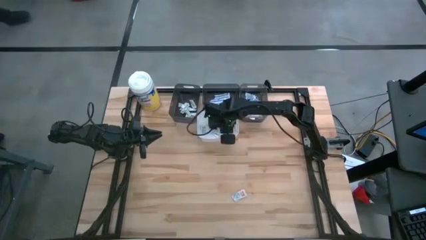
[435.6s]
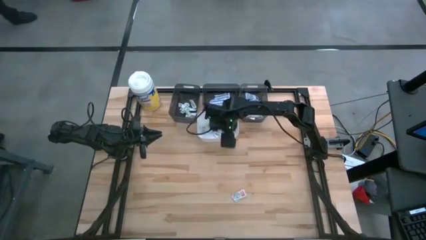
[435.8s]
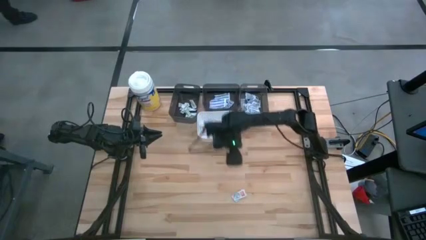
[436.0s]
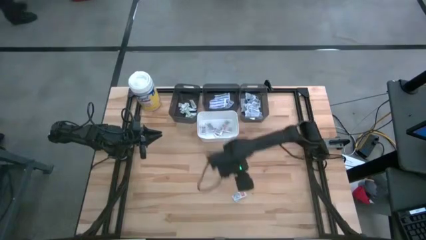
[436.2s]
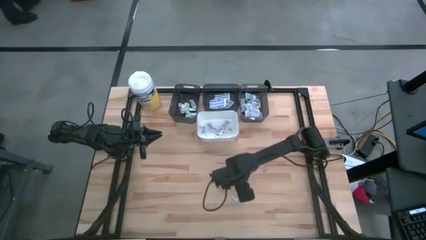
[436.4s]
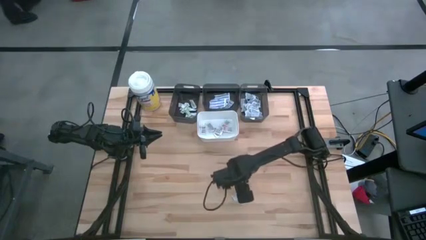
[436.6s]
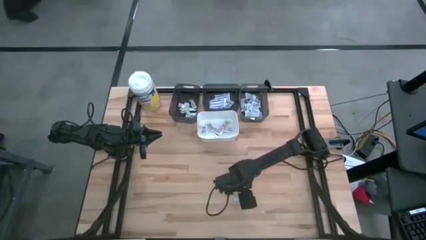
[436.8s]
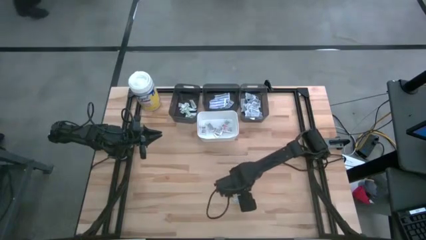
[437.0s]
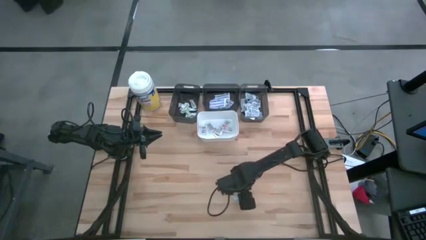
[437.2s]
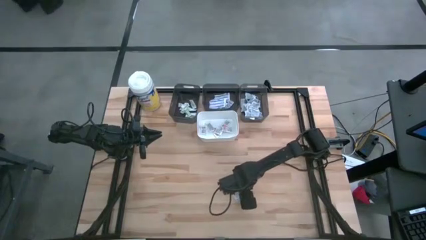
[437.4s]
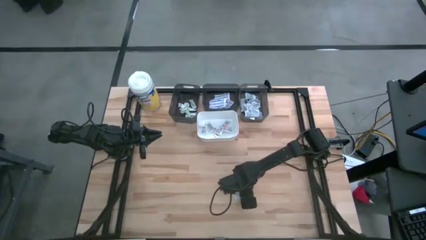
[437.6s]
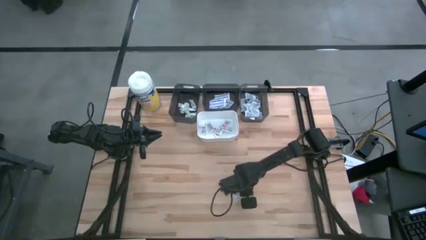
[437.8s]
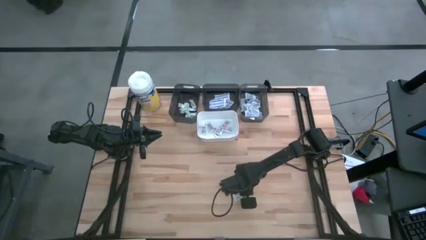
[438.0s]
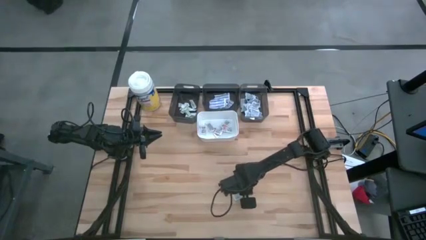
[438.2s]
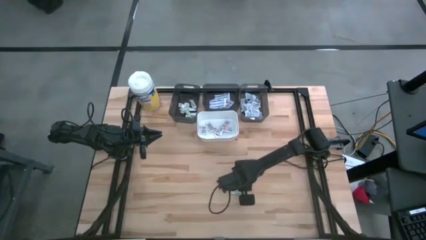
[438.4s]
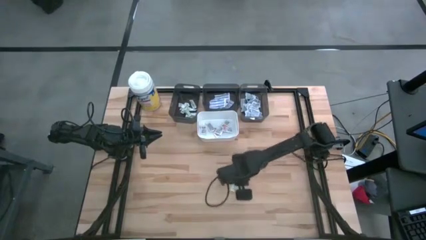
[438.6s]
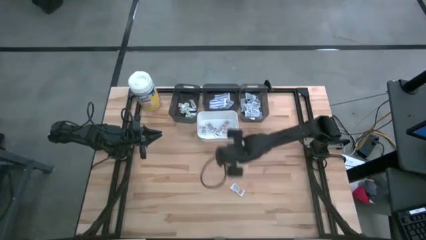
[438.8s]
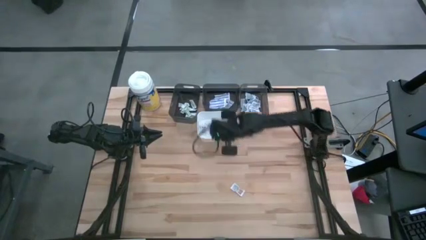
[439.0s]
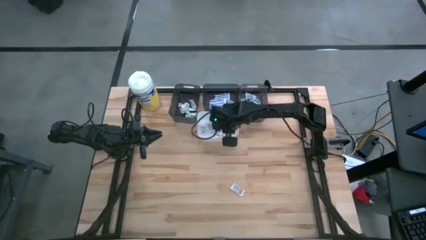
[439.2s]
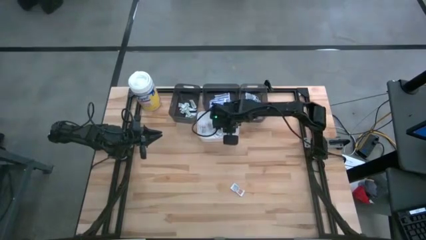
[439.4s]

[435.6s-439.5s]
Task: Pick & Place First Aid Supplies
Put the orange ointment pack into the white bin

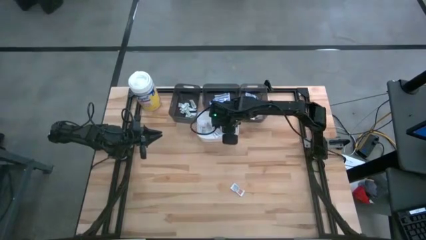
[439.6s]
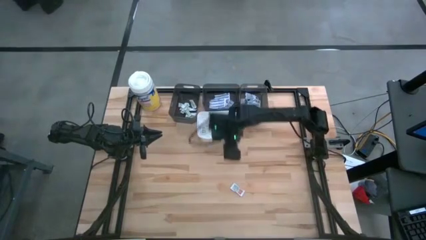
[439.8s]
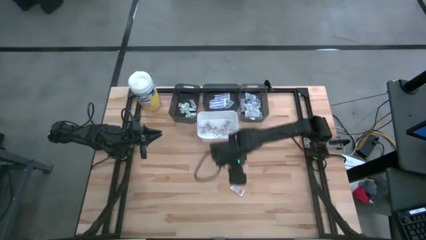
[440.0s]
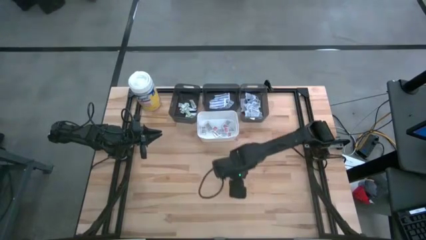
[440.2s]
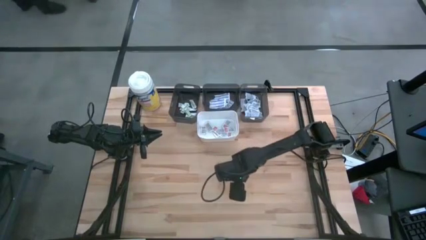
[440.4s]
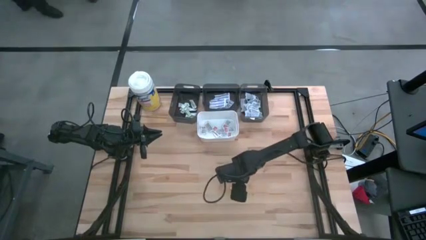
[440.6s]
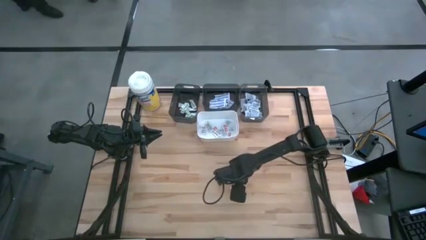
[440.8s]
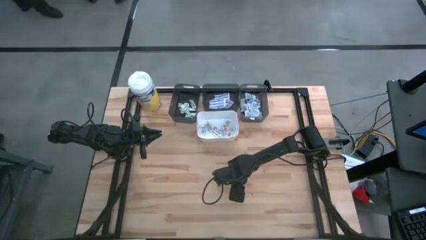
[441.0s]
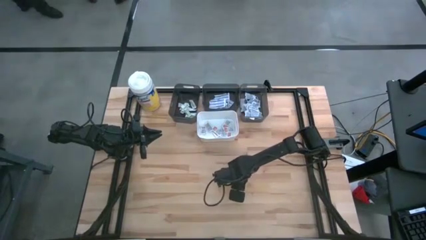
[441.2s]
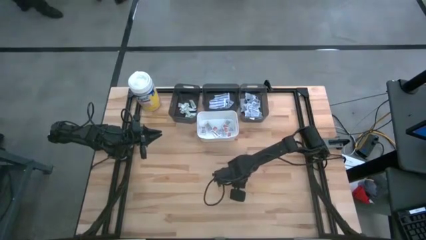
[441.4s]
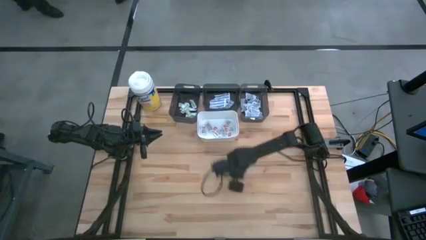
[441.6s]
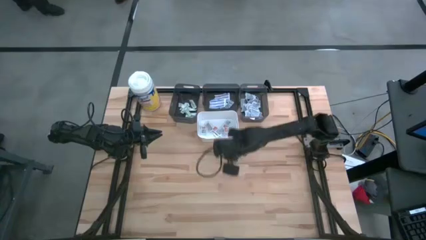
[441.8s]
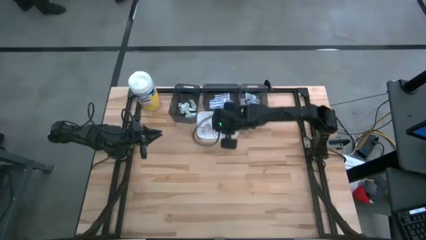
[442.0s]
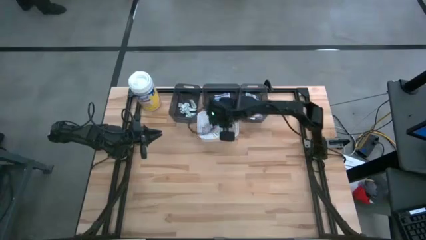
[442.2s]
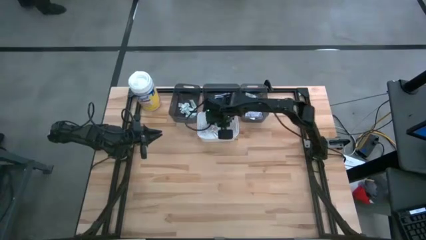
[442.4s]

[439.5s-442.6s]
Put the orange ointment pack into the white bin

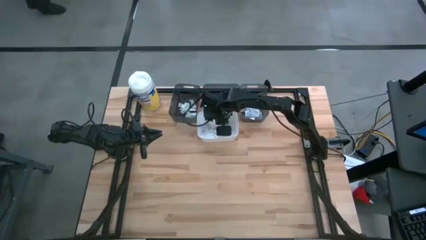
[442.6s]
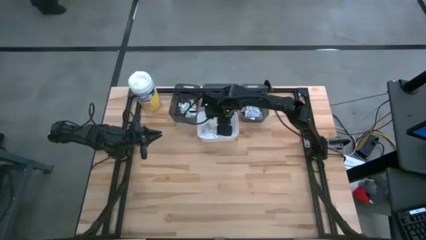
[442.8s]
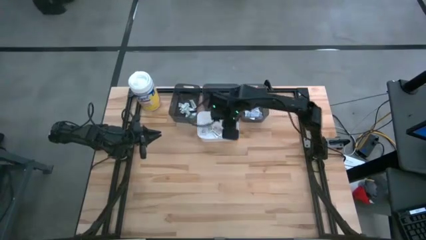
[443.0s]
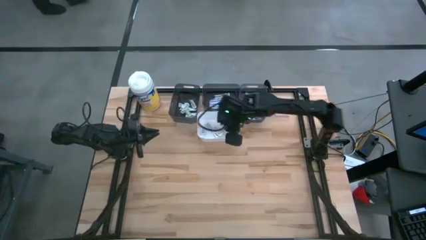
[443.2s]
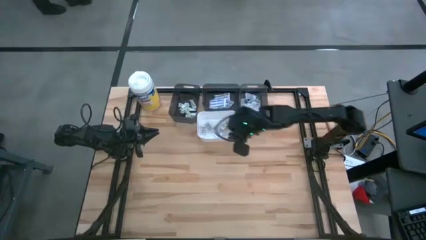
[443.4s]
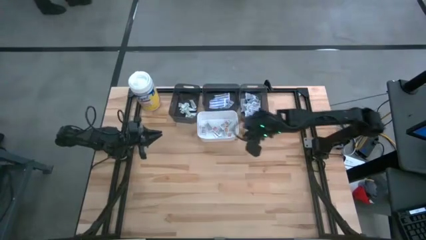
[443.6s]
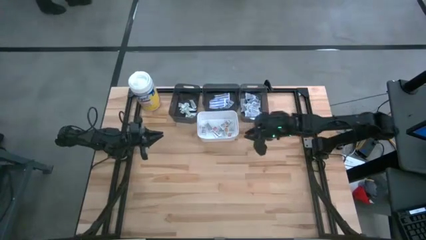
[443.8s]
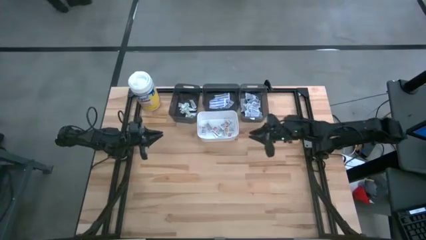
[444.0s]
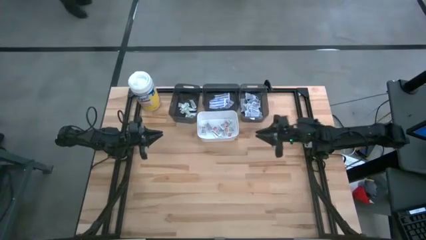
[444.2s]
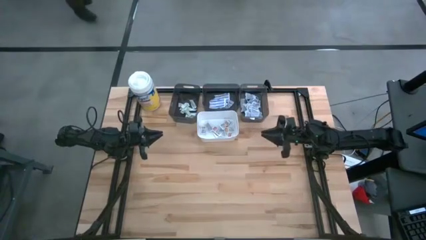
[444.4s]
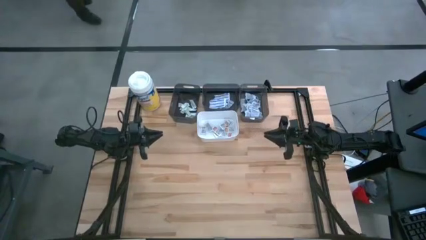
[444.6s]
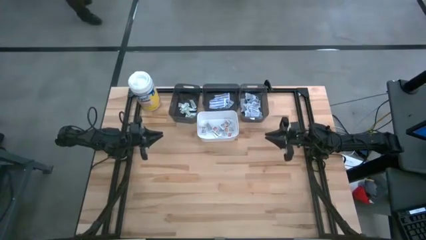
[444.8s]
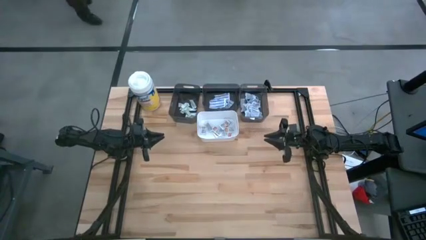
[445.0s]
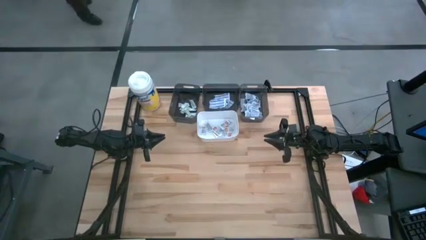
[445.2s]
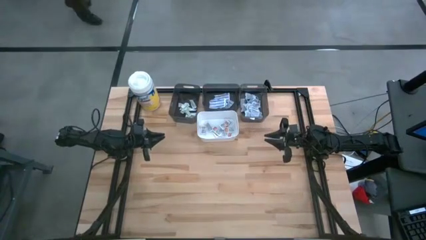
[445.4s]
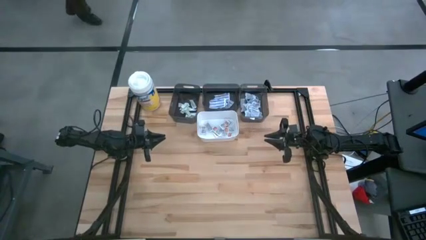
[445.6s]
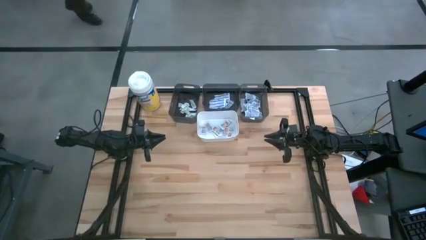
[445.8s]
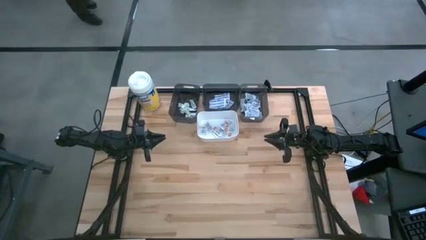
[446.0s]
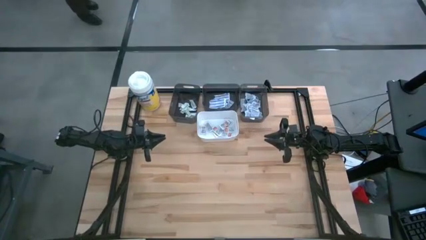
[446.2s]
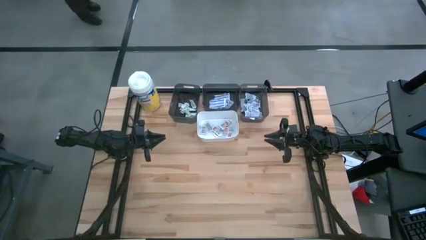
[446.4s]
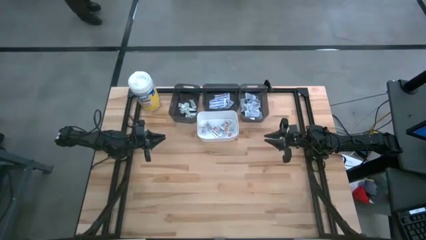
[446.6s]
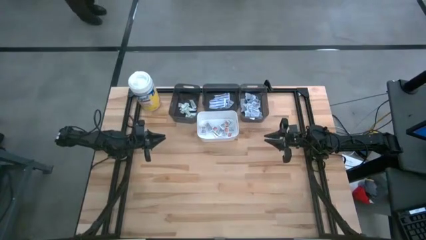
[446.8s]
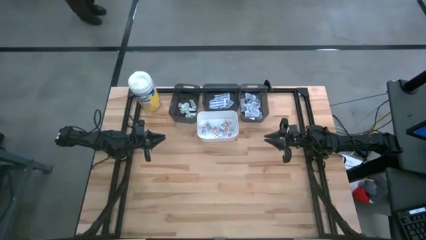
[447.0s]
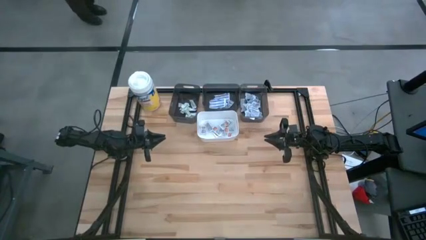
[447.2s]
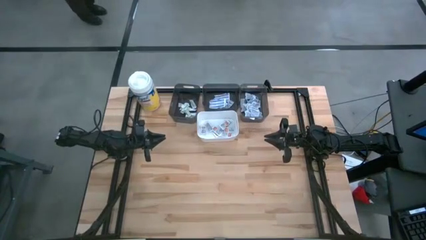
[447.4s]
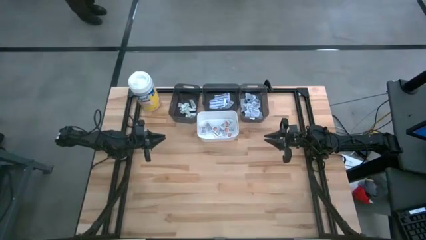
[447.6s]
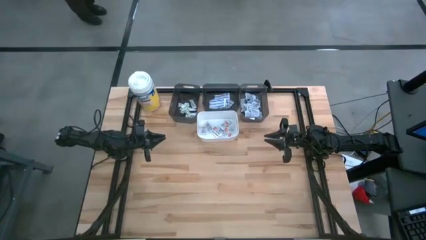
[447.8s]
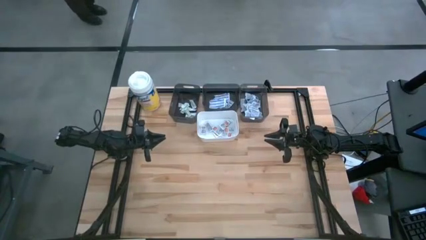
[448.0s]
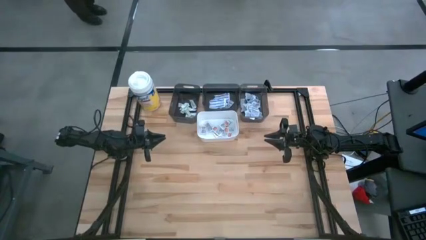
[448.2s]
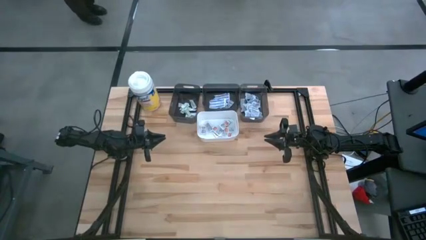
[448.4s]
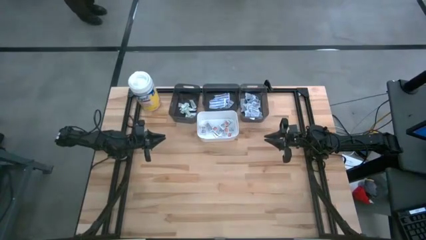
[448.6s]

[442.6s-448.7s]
Return to Home Position

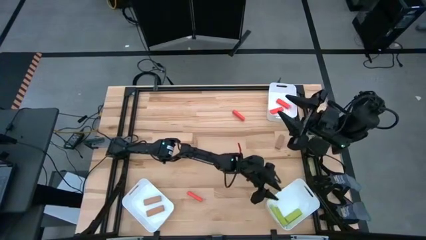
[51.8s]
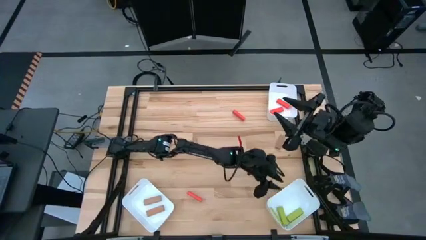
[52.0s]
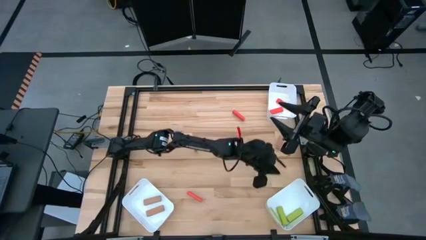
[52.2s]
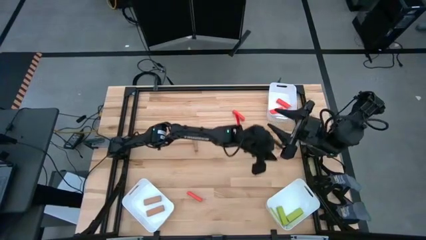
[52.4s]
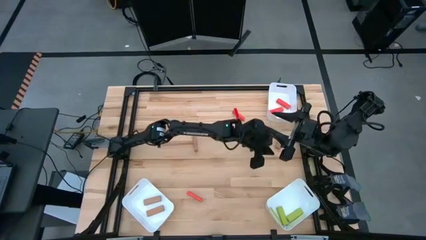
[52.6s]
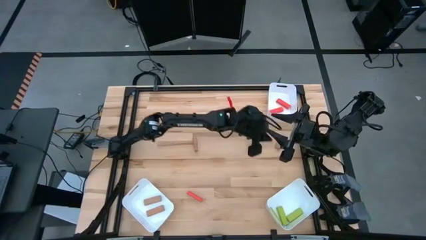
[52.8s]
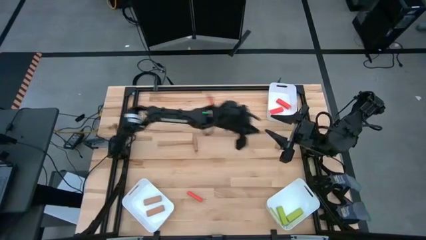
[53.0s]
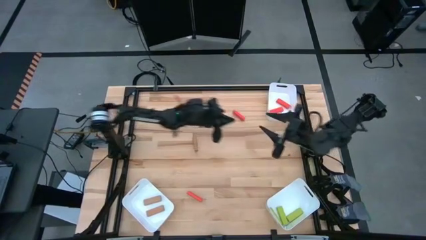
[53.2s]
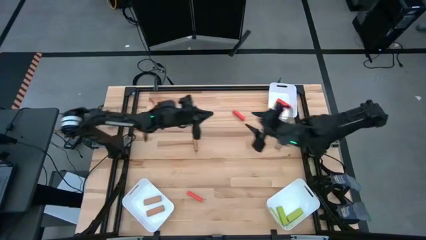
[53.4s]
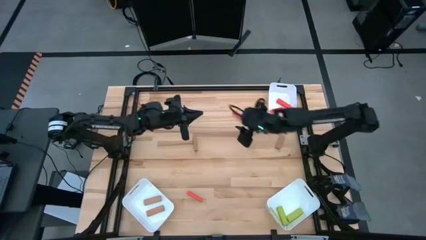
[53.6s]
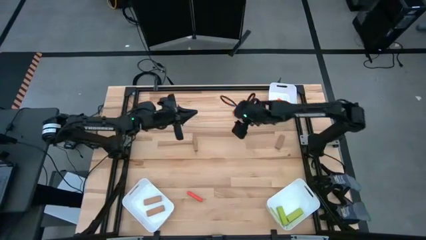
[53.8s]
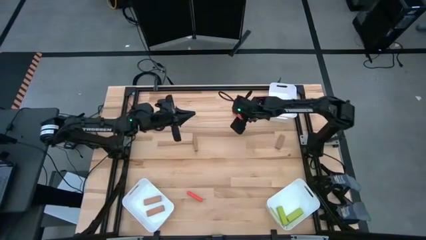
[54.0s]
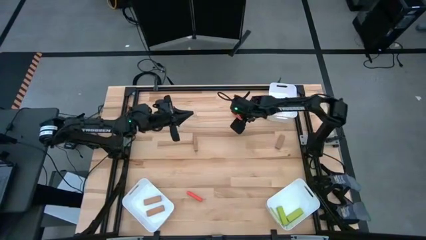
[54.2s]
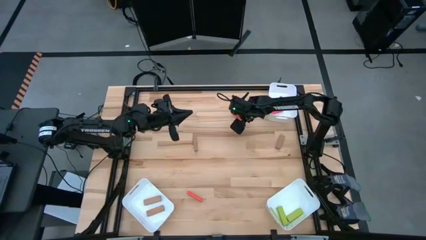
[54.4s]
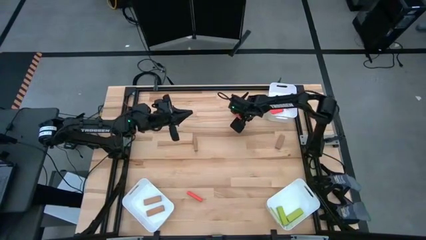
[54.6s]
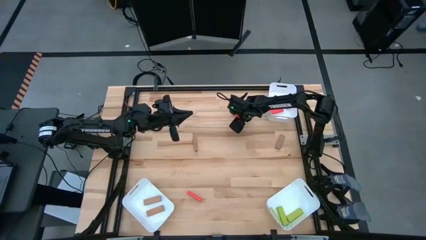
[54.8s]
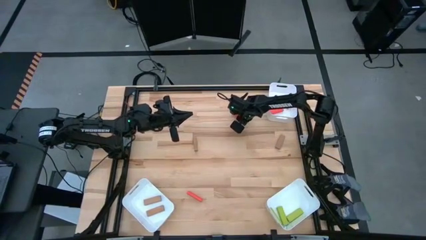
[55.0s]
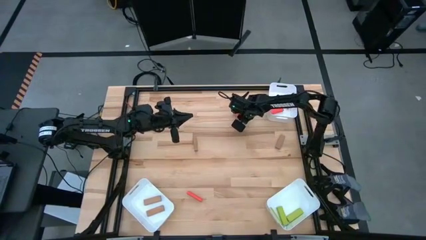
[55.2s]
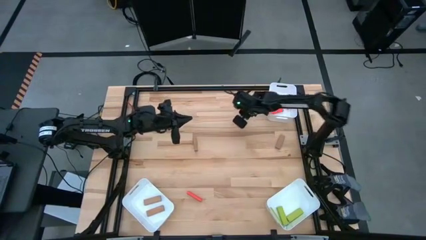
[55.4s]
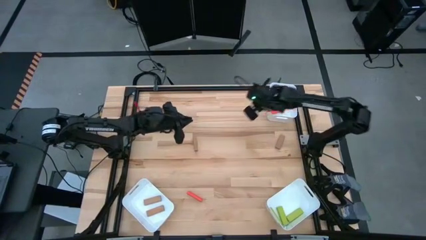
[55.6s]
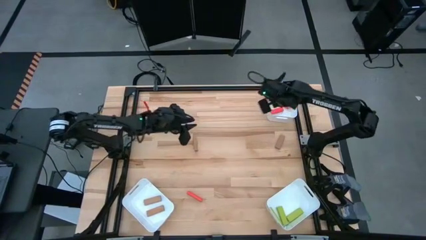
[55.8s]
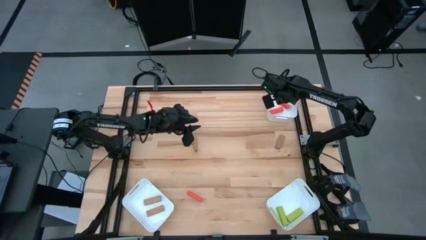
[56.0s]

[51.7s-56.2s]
Task: Sort blocks
Put the top orange block into the top right bin
